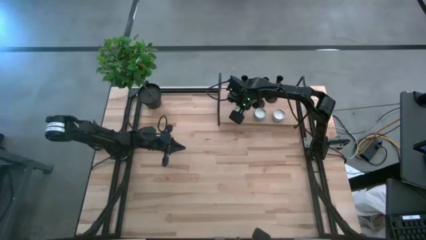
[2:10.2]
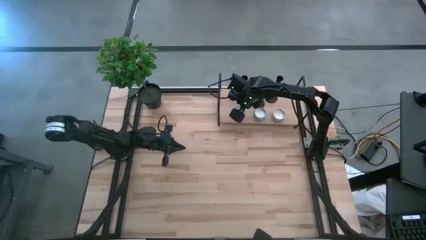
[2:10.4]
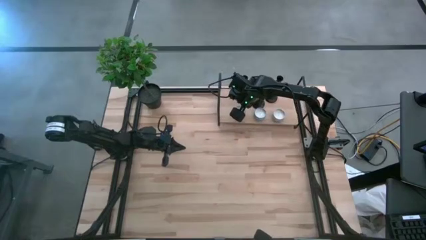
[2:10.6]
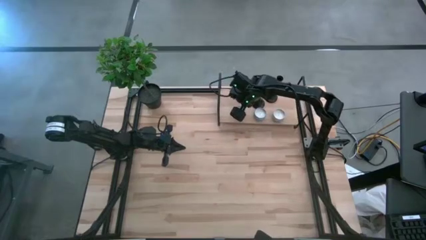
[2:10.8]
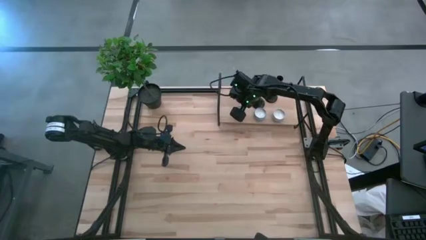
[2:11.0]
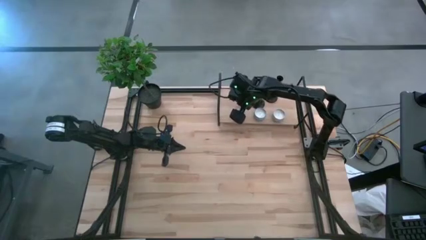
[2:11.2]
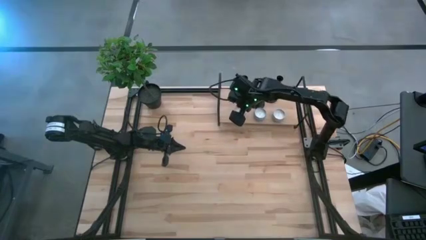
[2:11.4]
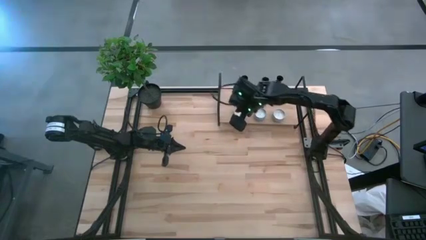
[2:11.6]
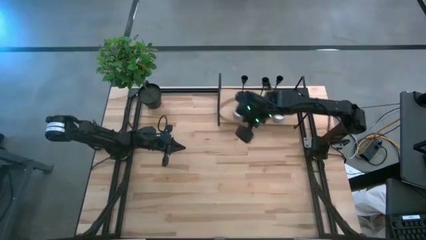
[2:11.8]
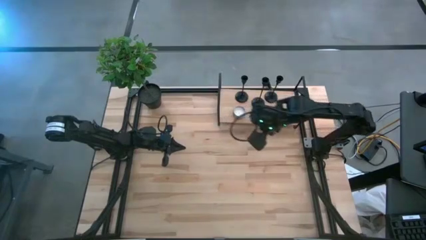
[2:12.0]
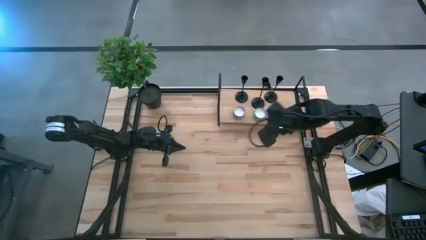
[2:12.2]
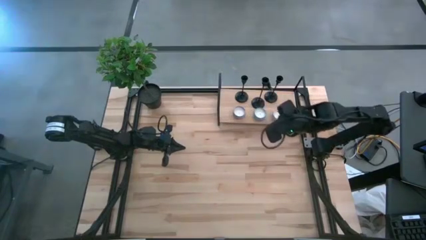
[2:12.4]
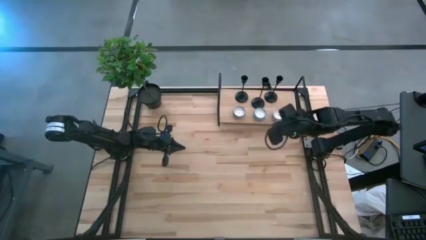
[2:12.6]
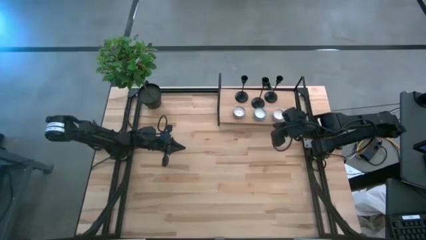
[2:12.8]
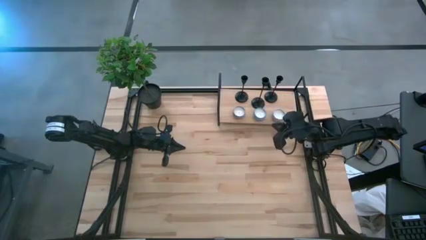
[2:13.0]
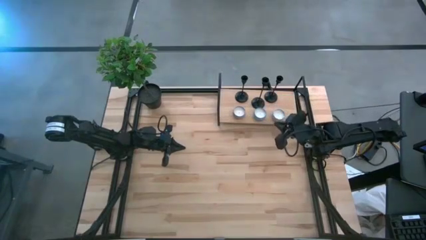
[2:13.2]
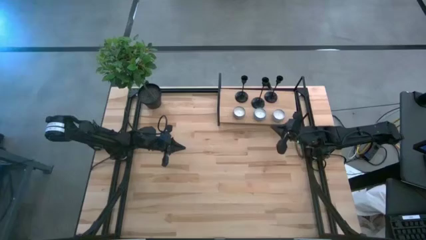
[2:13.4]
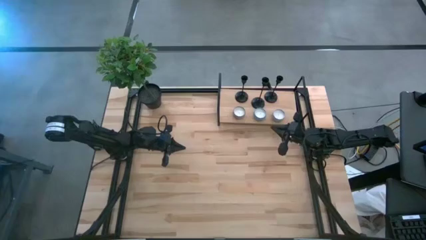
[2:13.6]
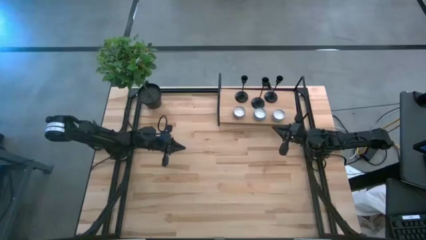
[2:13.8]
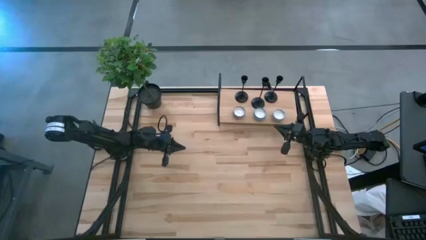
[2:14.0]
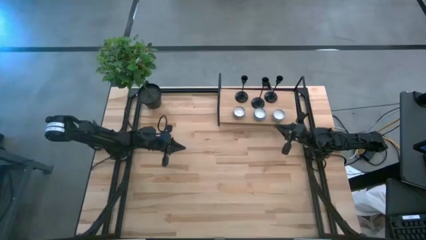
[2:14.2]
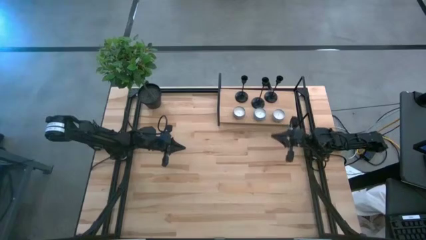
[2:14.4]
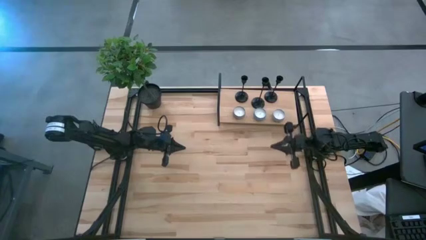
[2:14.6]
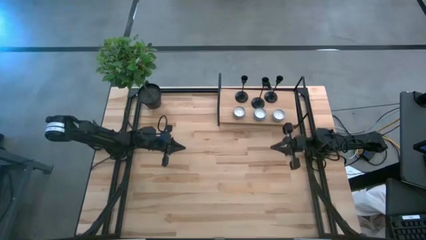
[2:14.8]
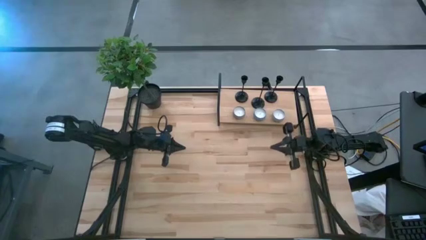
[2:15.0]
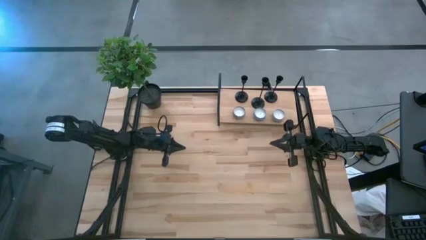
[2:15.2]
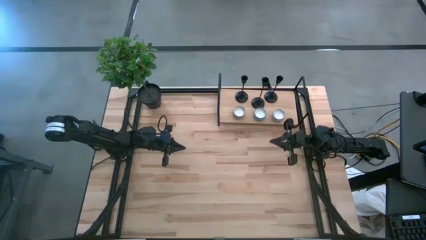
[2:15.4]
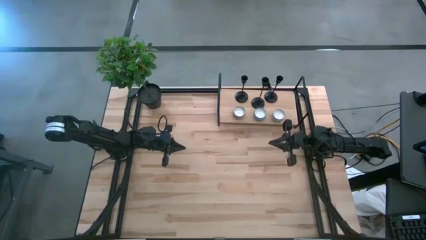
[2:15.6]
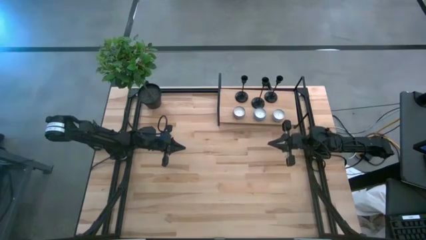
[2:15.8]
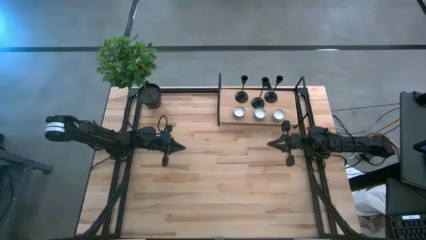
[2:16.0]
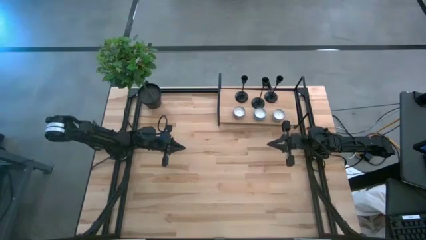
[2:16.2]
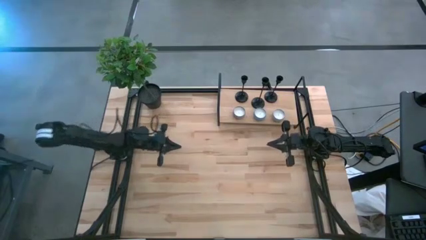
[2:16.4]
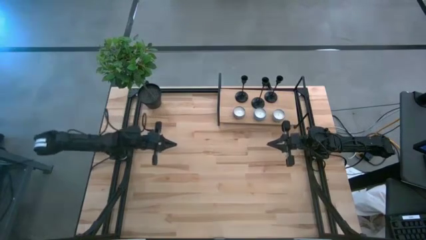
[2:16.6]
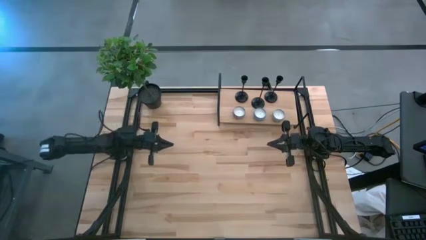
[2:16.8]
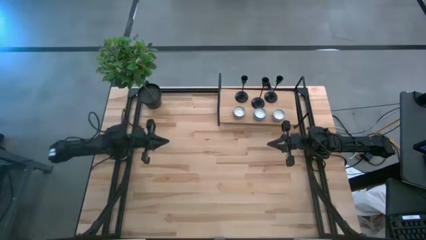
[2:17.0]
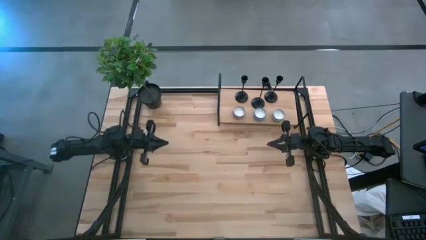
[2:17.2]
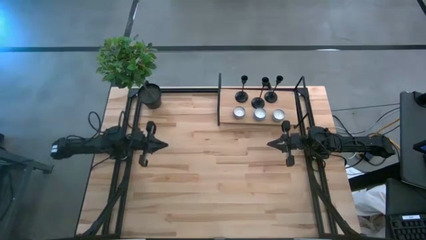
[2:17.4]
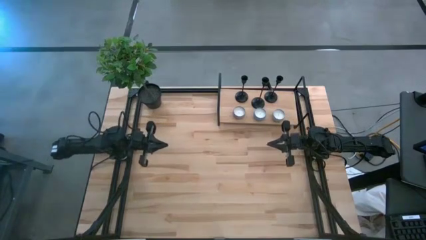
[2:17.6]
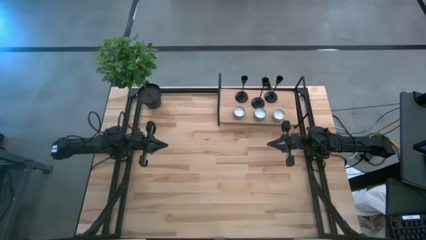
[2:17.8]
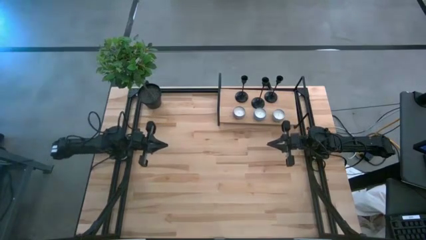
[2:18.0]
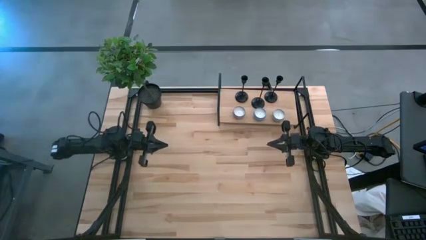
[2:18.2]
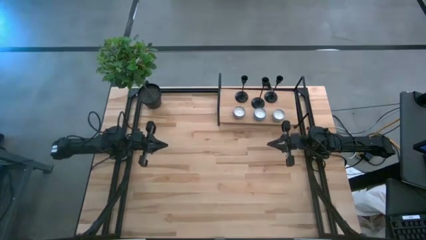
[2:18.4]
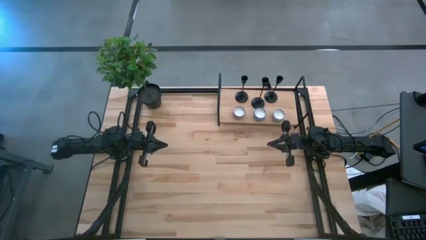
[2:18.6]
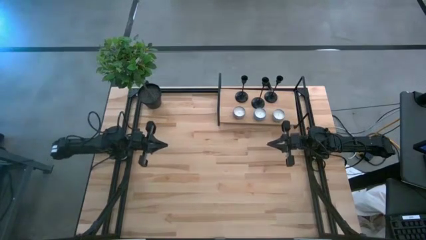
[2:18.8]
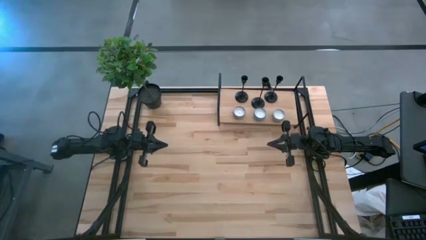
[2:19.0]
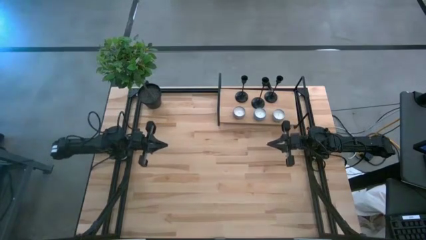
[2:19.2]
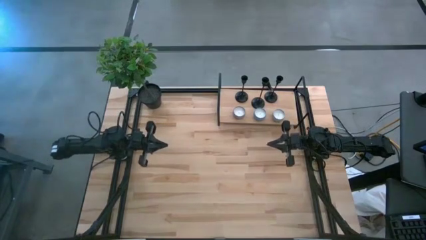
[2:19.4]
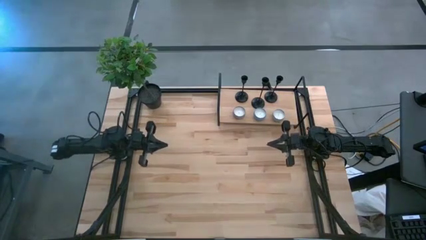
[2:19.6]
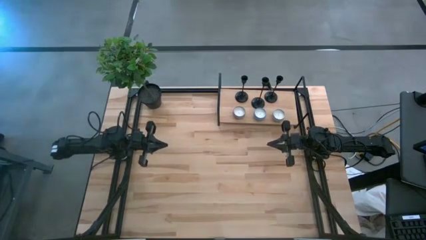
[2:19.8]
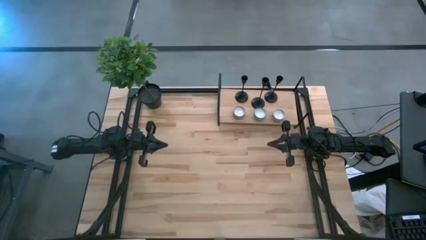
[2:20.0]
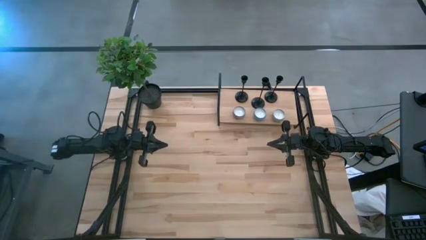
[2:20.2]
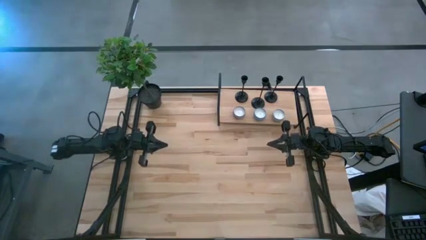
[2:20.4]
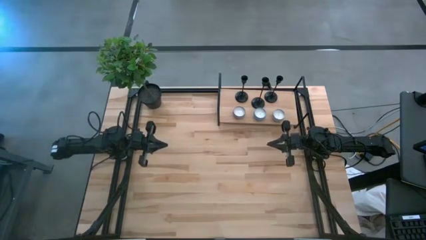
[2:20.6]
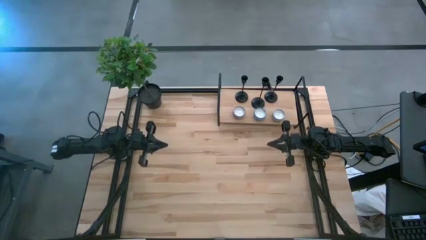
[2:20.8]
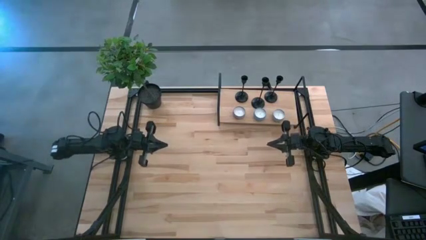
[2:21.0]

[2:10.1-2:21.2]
Task: Pick & Place candle stick holders
Return to Home Position

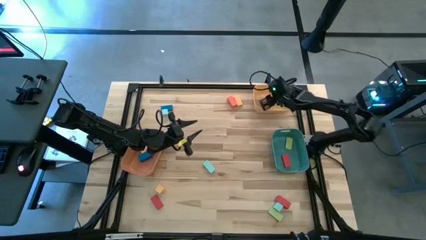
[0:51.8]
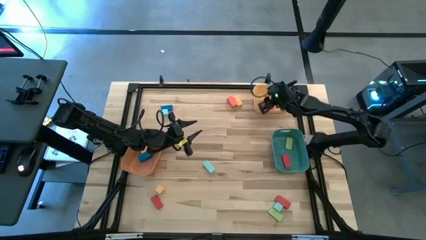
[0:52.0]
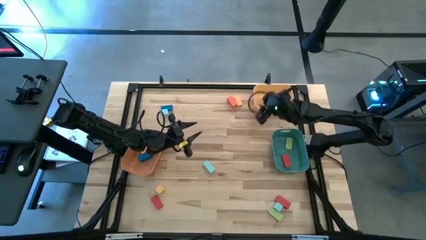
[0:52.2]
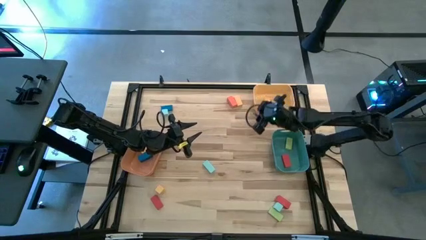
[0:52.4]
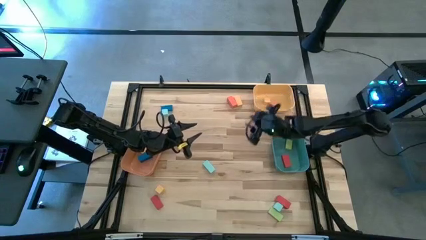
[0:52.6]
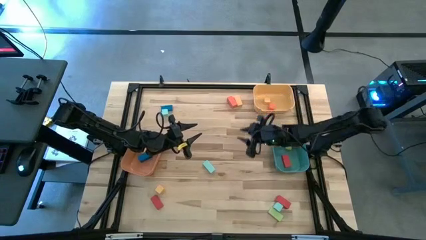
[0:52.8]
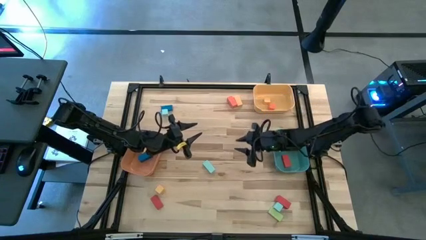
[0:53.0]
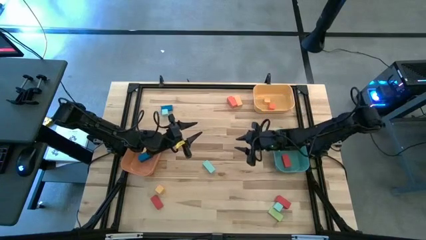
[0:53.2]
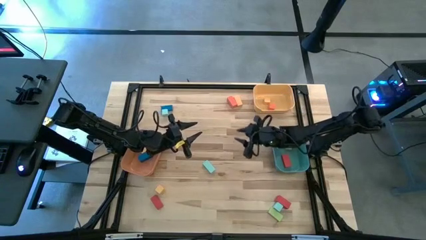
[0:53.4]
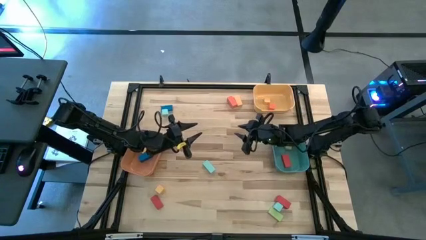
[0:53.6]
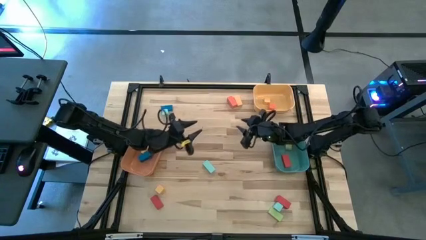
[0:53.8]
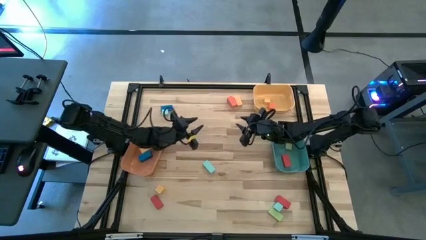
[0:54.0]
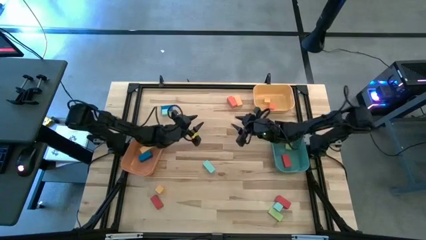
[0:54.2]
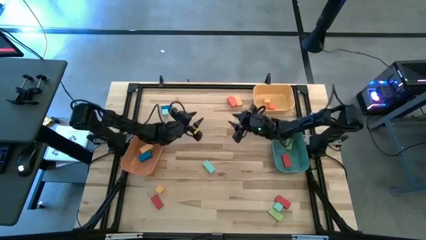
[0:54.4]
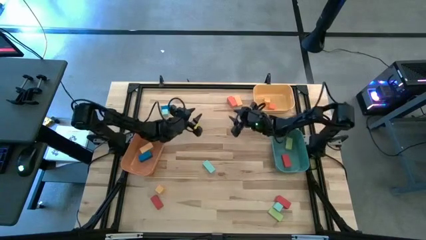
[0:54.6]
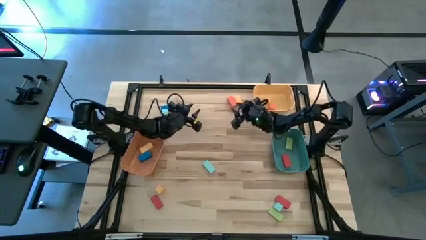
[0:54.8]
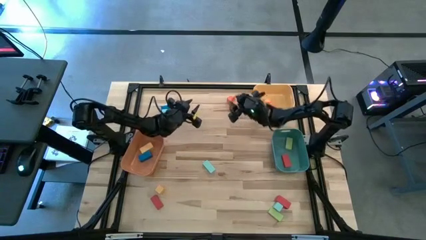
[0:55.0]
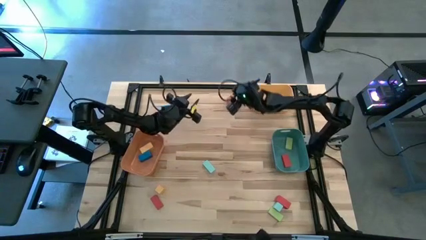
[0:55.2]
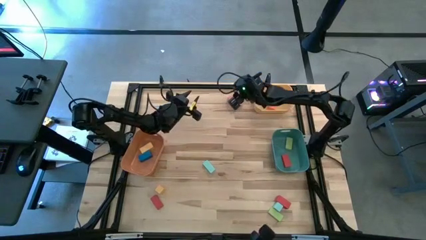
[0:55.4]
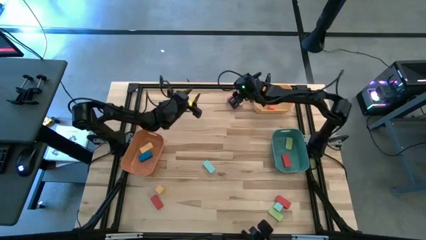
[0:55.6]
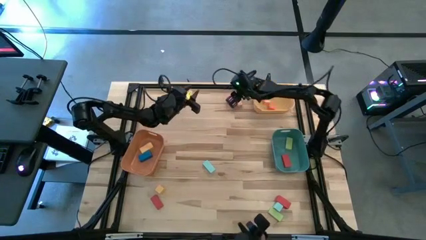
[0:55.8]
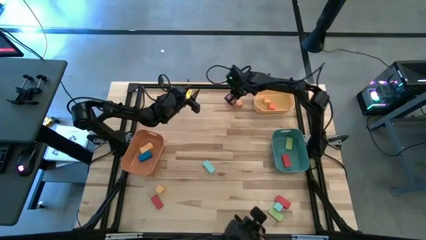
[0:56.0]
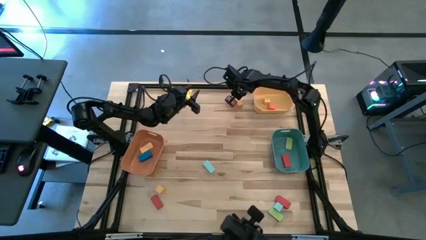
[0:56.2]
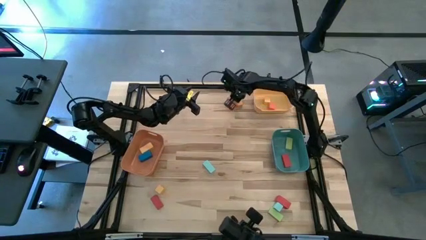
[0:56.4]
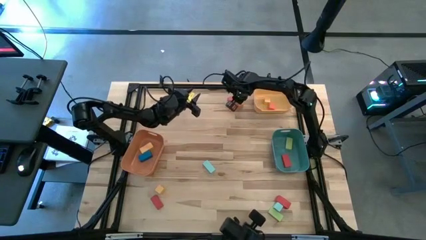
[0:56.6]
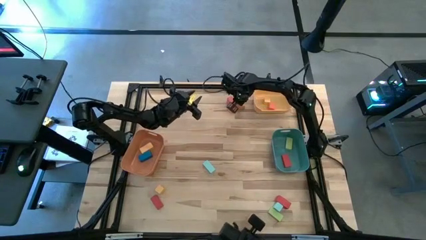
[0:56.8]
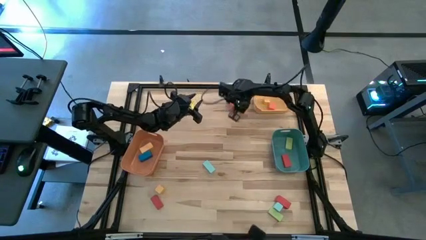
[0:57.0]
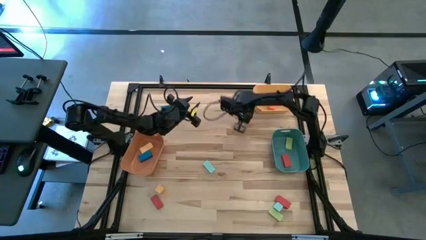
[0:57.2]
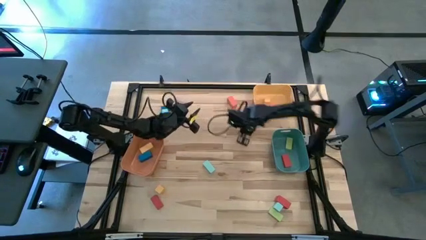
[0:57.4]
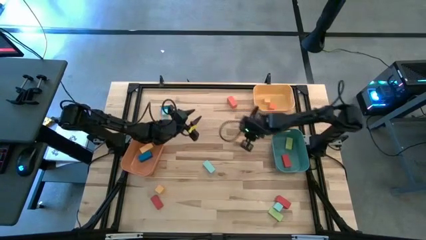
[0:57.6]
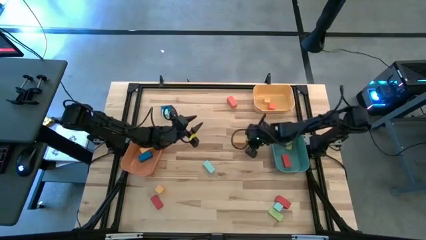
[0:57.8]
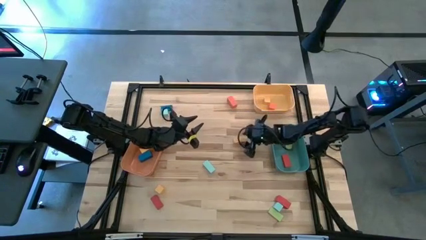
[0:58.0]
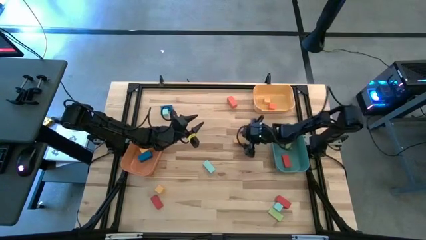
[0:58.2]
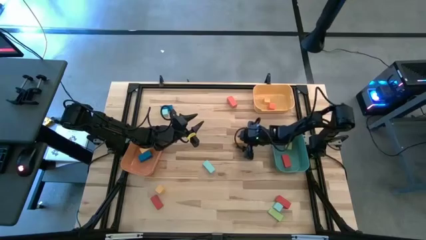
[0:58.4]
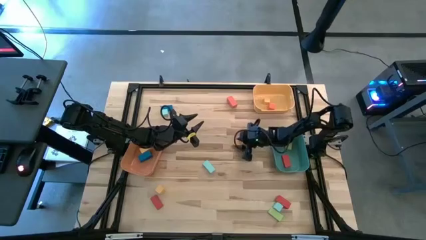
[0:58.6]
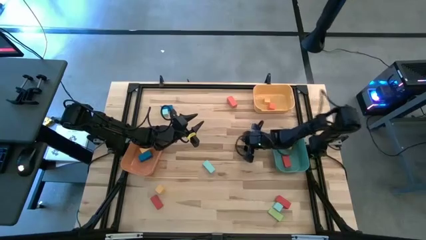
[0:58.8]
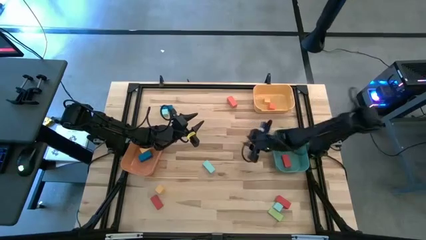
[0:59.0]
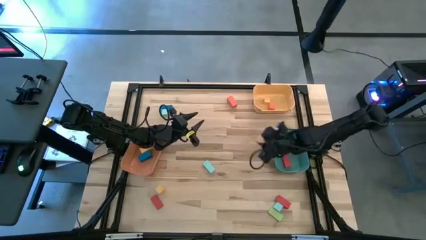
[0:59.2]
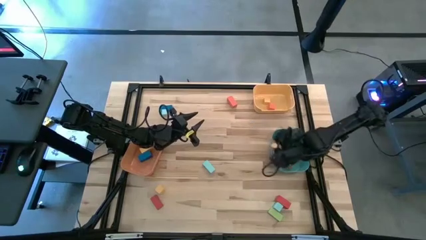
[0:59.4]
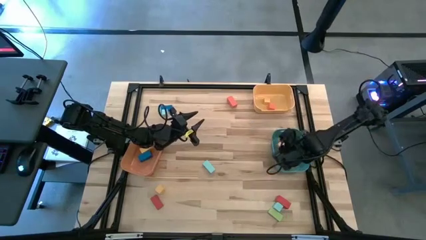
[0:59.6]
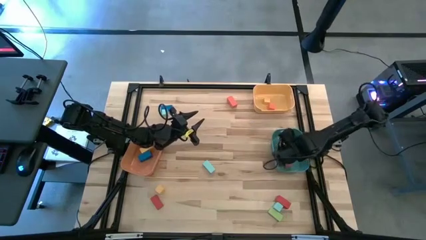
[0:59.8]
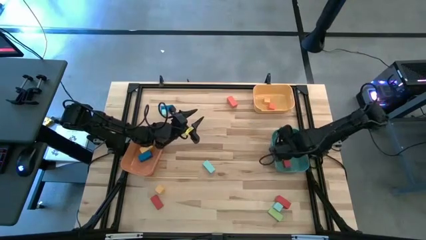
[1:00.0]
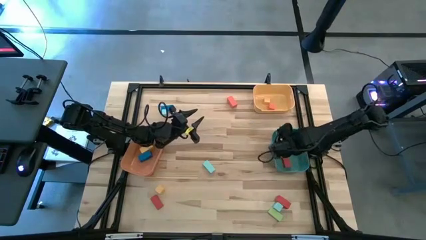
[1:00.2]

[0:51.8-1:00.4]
Task: Sort blocks by size
Put the thin yellow rectangular block into the green bin
